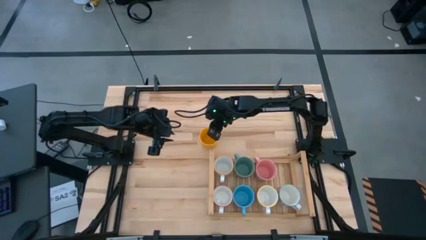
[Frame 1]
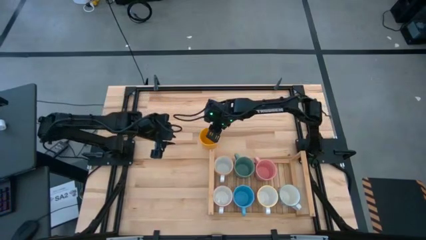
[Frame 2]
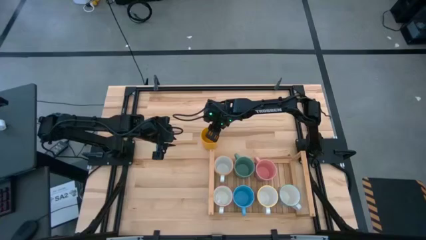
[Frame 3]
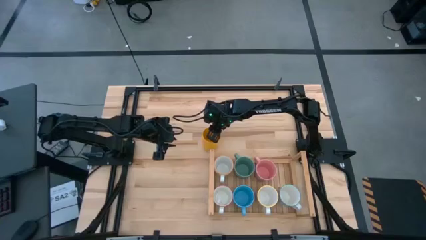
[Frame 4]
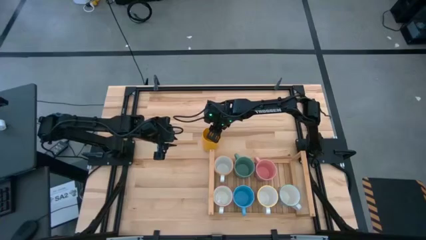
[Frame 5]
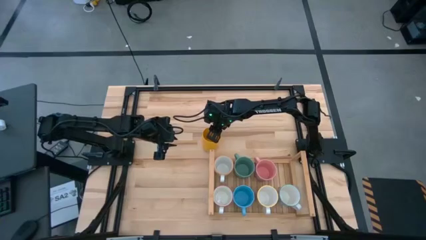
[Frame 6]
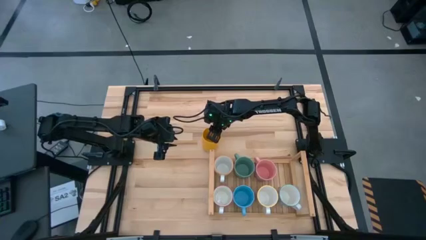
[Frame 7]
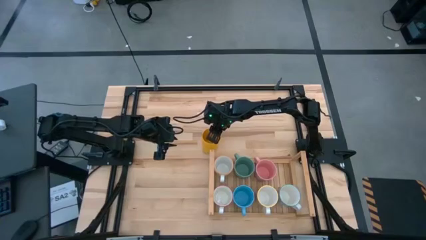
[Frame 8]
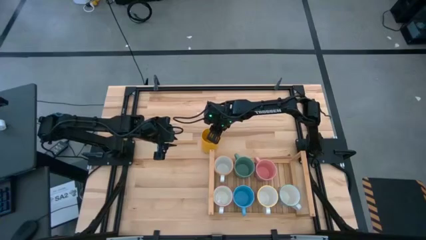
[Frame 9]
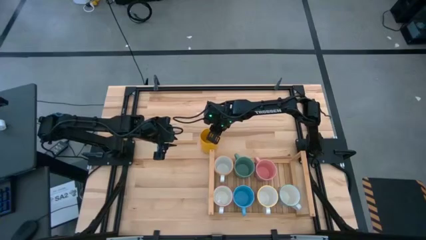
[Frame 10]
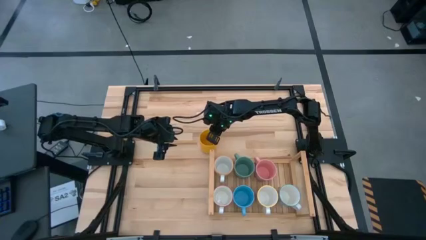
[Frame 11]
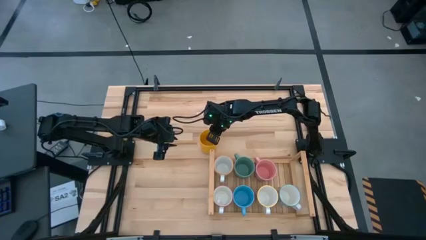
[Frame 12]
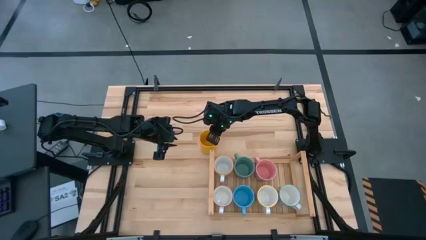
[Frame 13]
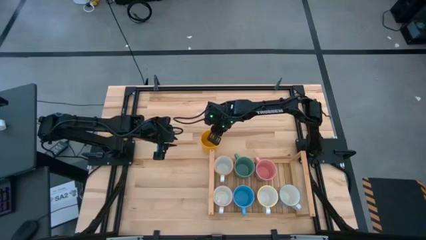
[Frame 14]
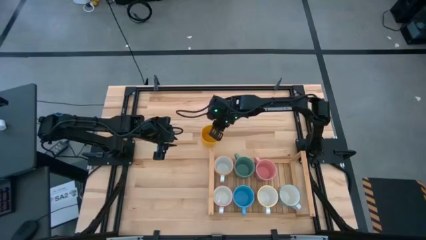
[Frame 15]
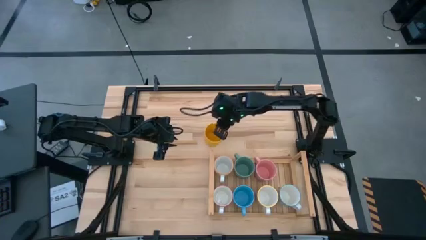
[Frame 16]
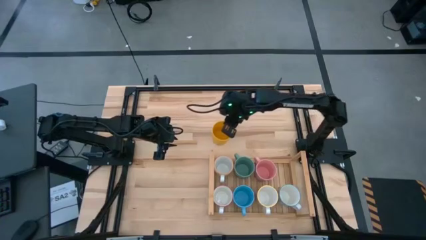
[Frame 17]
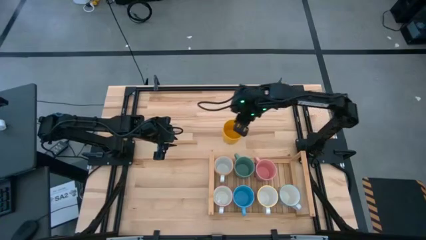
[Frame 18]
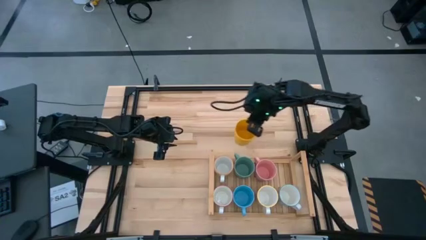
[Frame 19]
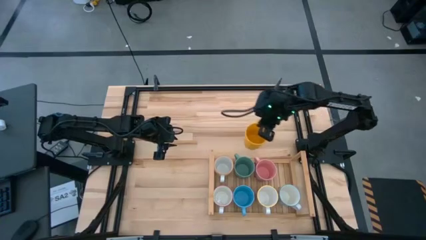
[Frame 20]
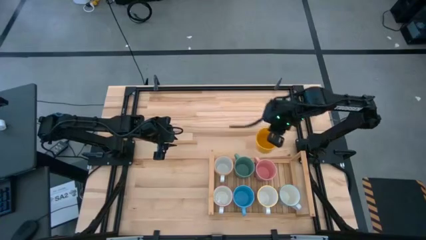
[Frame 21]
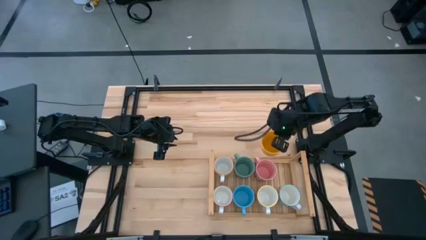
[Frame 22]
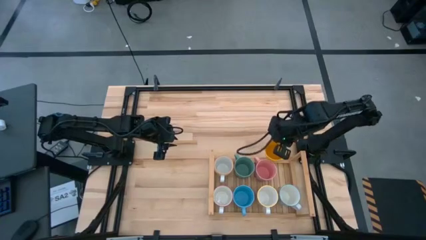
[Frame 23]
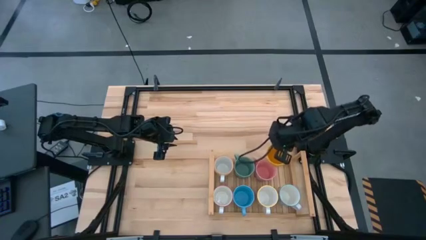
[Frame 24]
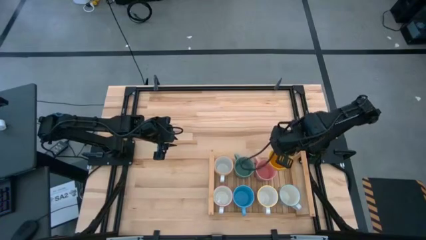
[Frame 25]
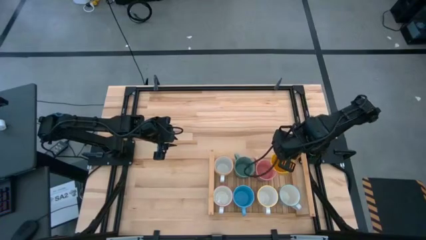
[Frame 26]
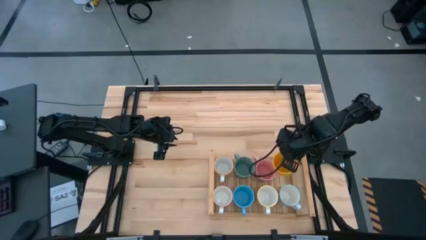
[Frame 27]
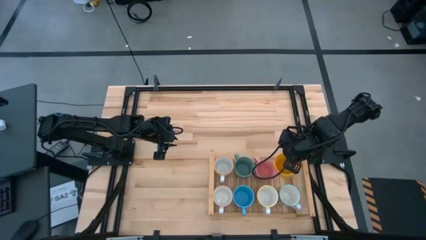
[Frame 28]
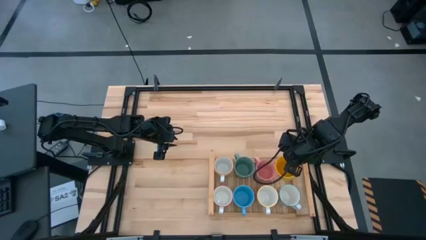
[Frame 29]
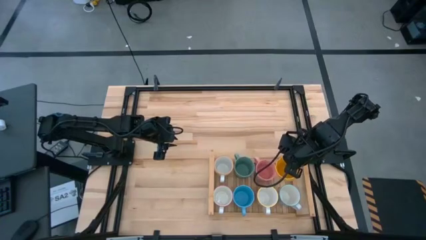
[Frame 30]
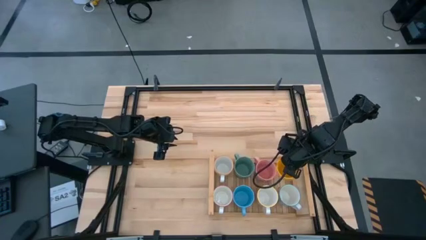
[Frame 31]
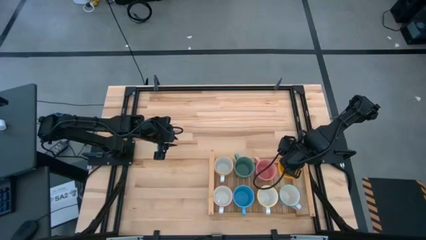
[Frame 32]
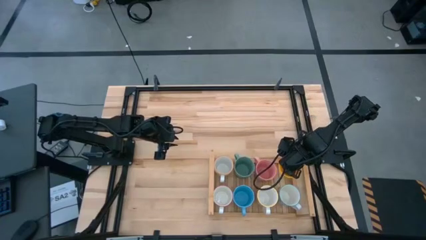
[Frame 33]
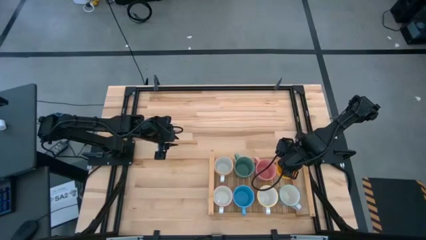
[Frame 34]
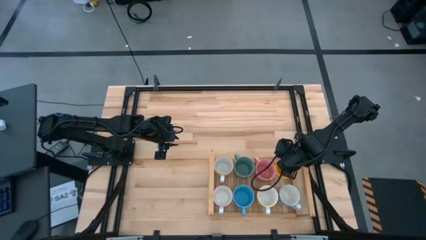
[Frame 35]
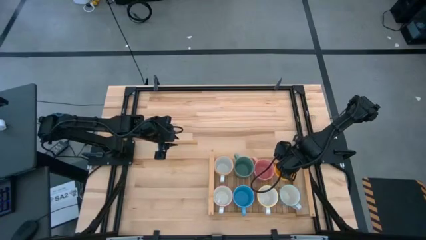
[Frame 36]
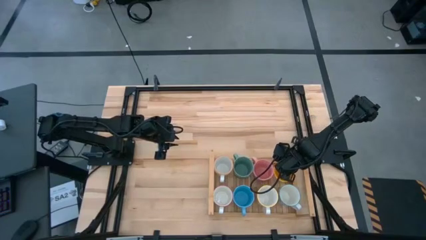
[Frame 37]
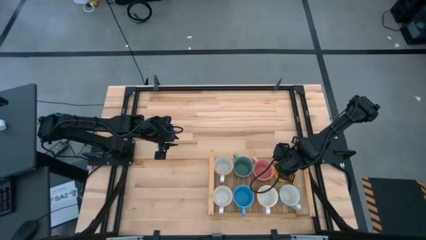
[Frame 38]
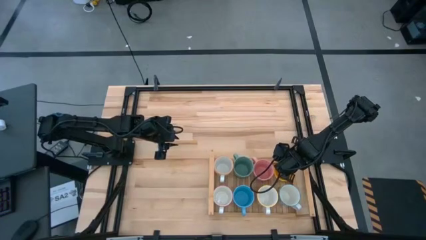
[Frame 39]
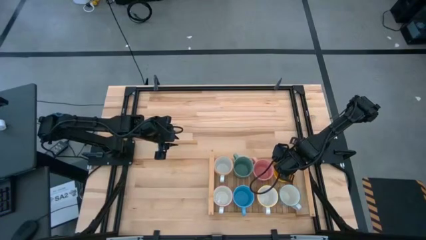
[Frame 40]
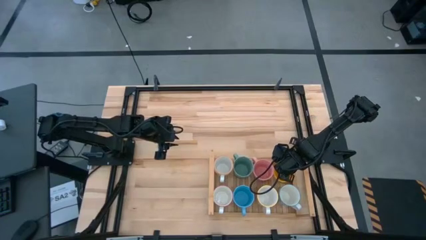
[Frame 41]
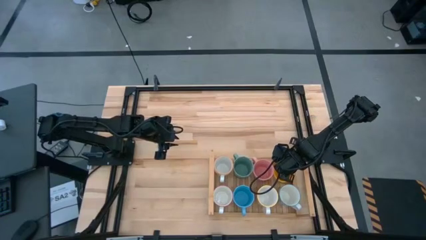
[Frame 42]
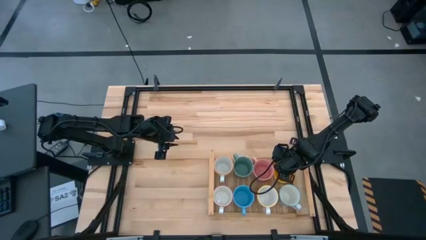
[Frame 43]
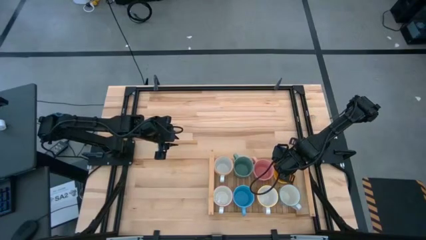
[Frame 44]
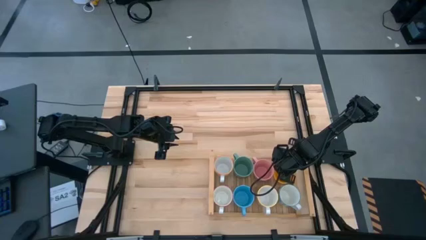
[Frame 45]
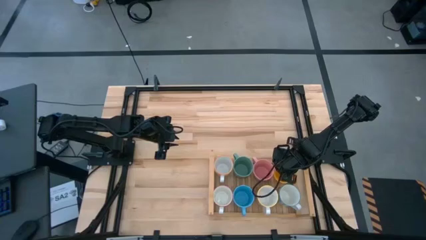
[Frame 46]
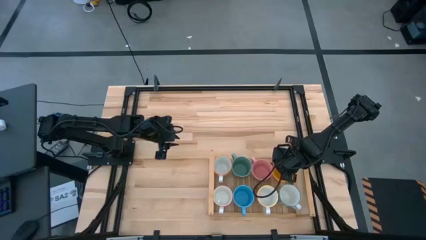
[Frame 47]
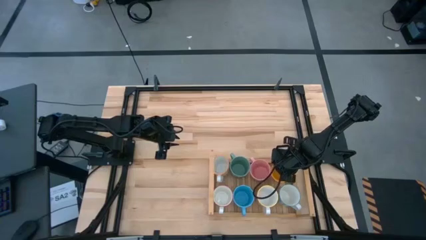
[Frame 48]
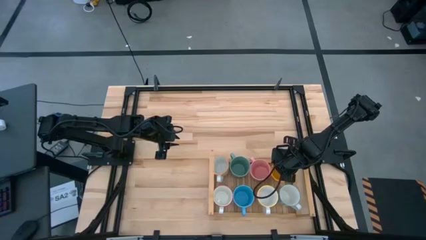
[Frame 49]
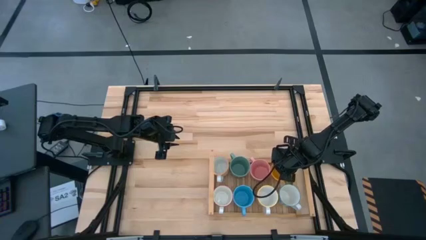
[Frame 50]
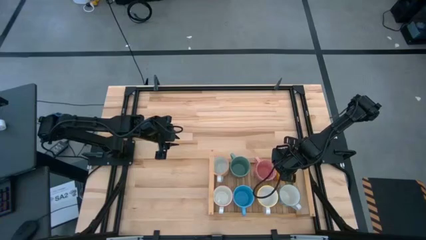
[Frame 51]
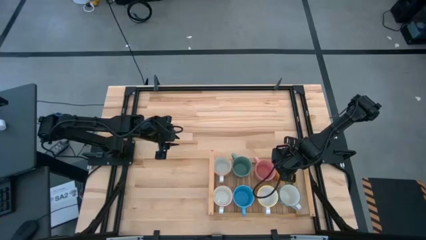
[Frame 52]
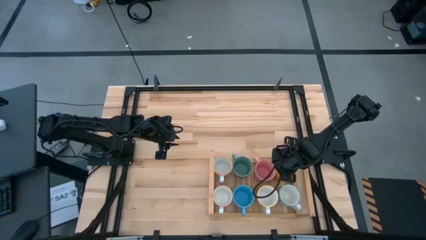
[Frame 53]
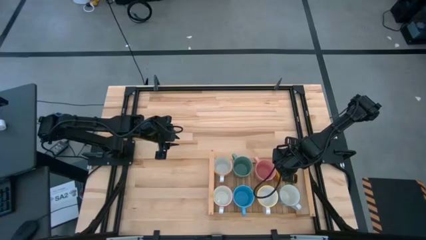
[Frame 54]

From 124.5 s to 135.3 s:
Task: Place coffee mugs
Put the yellow mug on the shelf

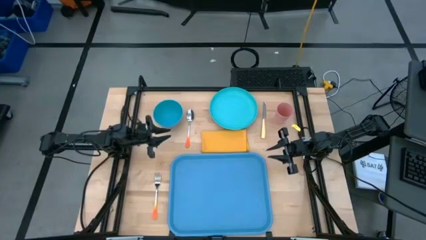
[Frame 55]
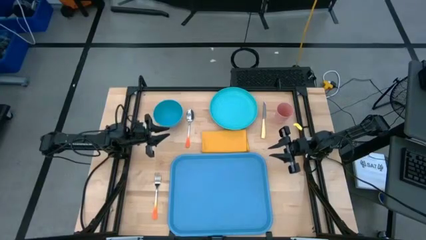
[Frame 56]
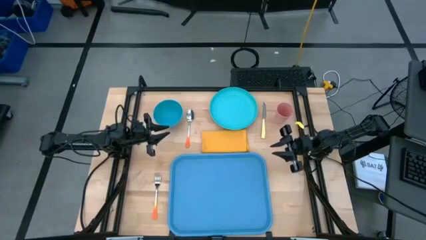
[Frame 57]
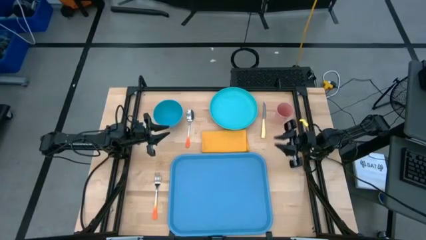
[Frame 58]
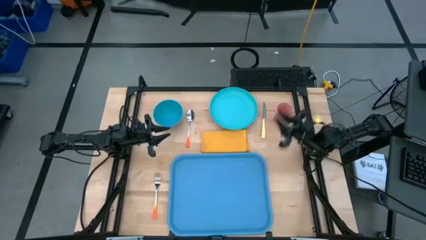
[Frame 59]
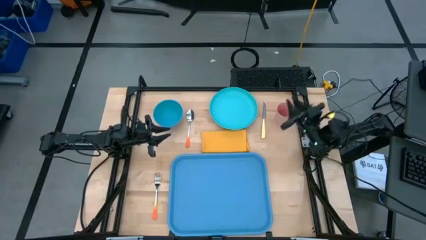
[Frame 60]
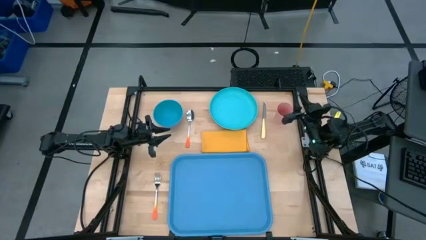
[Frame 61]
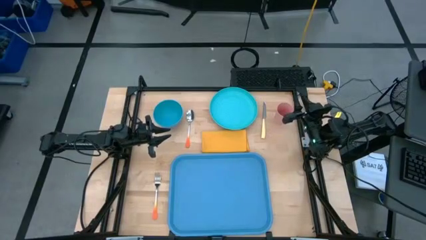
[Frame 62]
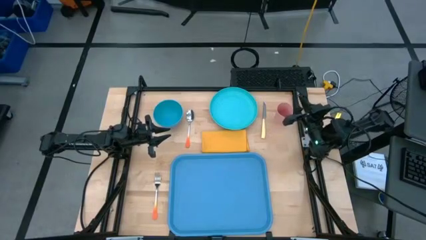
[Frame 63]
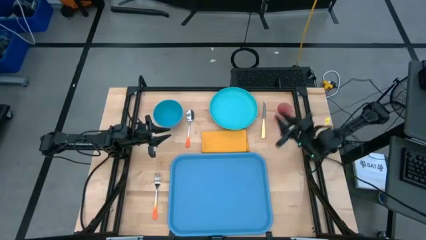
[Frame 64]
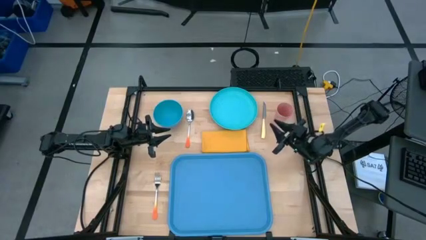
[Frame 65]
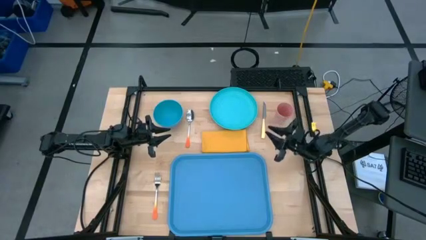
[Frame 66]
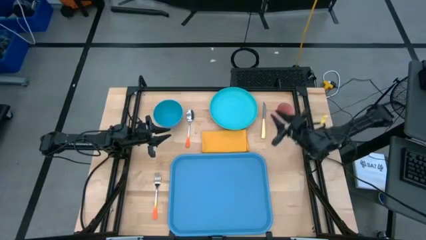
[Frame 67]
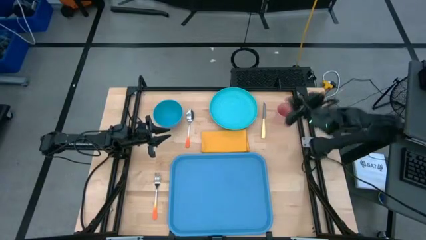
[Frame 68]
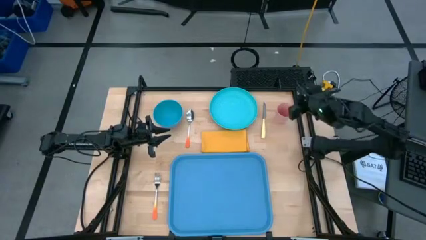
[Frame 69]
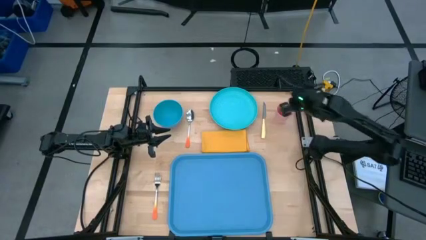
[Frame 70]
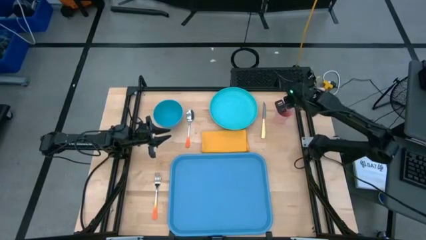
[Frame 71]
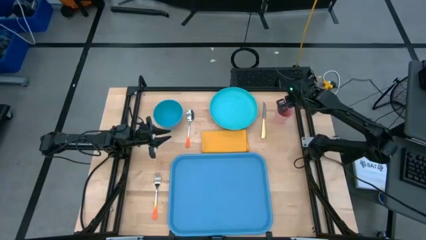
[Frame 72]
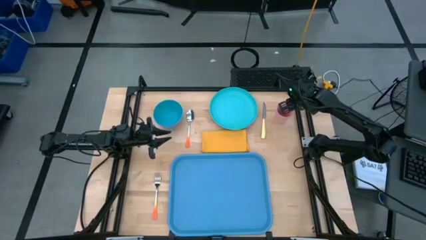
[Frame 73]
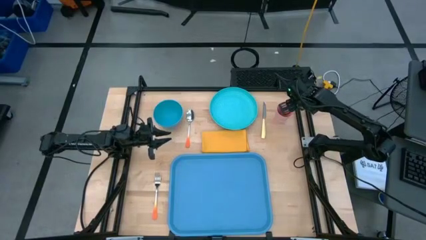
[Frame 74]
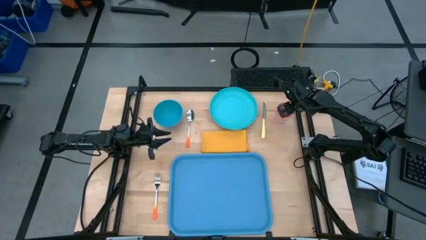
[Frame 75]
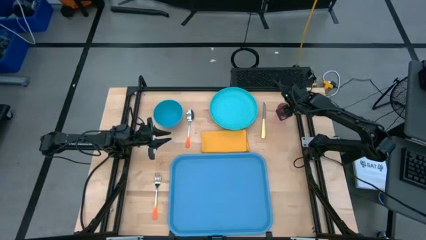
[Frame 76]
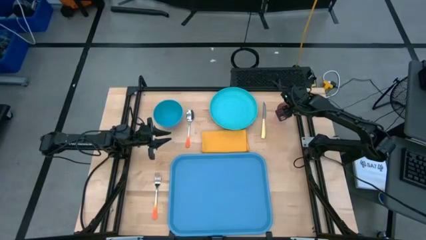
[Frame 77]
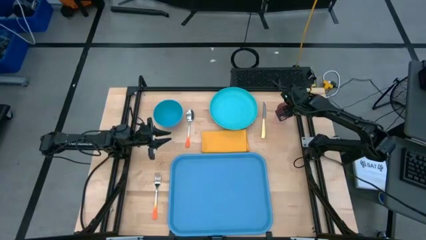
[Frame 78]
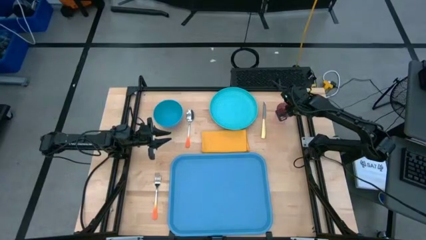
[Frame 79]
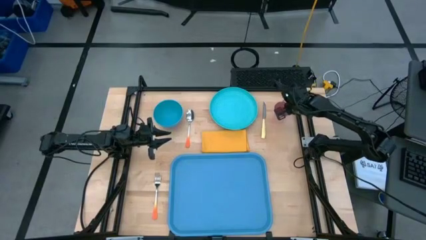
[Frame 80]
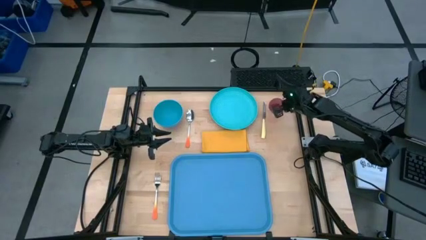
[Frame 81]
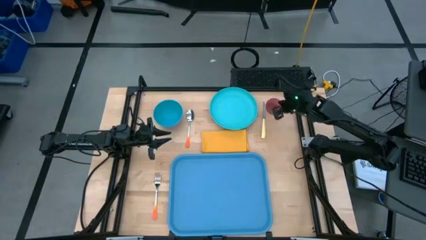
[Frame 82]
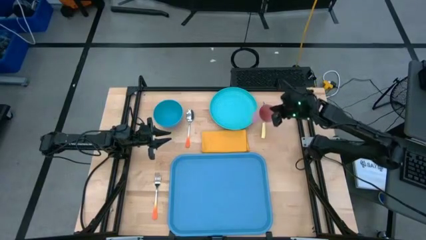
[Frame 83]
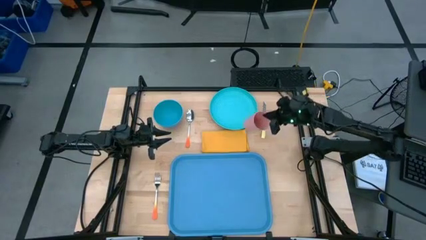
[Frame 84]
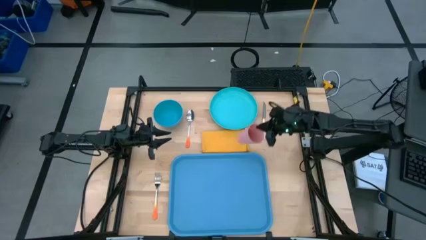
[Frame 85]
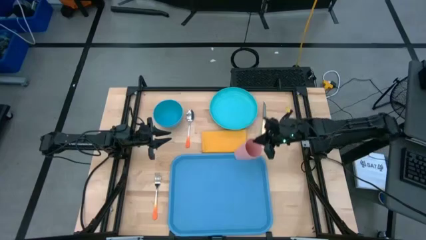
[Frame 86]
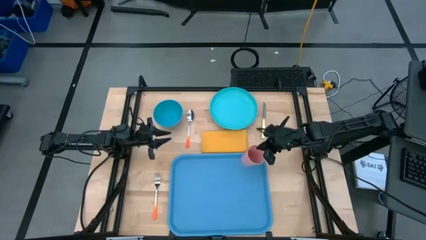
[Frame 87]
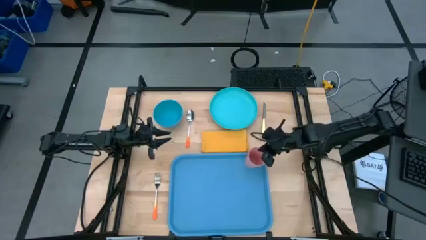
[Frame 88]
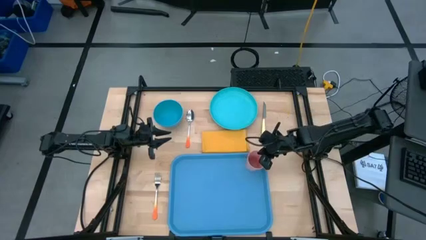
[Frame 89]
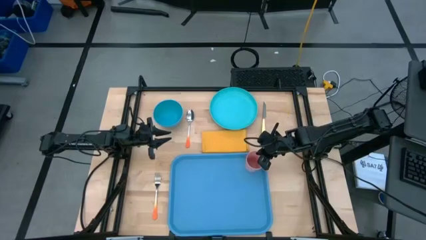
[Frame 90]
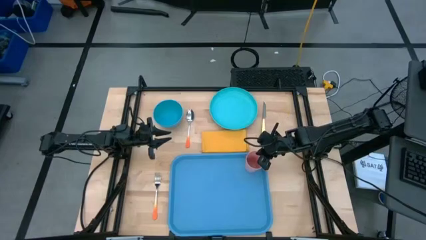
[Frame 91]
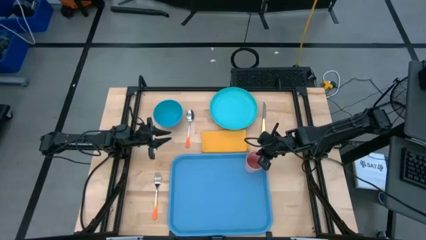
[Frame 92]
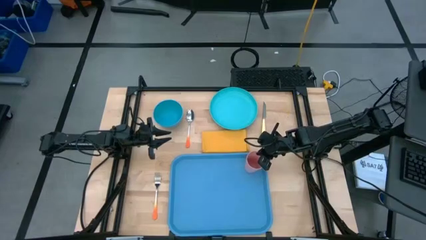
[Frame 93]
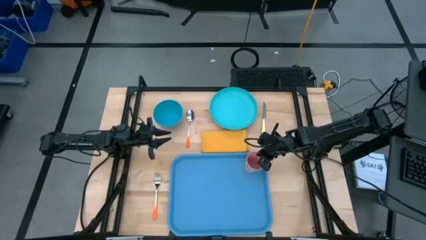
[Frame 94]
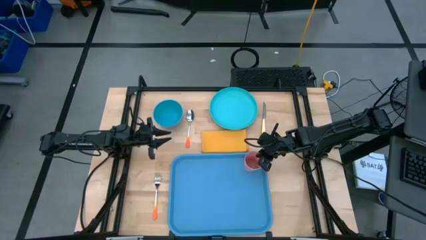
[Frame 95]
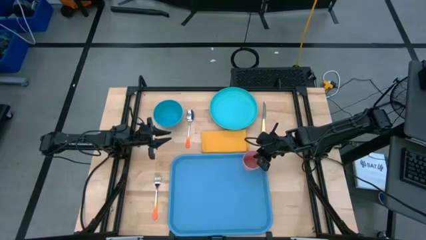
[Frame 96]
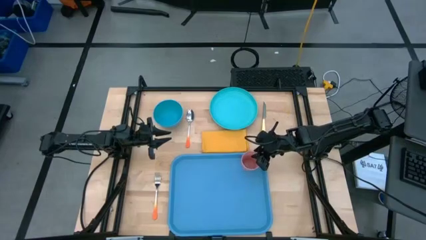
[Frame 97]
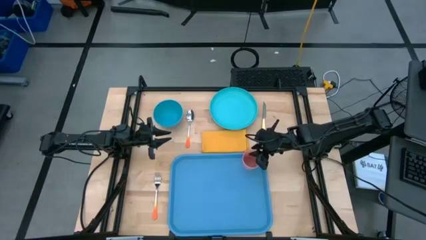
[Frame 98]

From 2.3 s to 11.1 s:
Task: Set up tray
Put the pink cup on the top right of the blue serving tray
